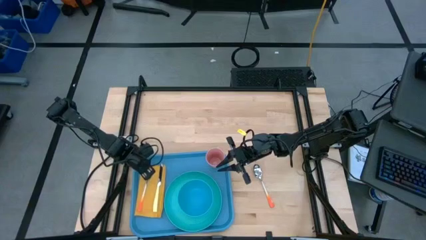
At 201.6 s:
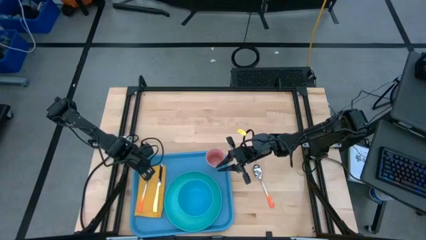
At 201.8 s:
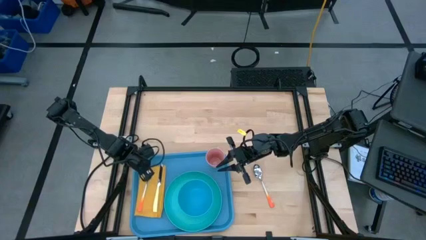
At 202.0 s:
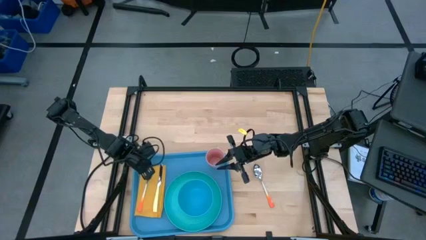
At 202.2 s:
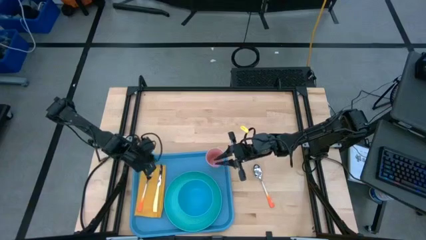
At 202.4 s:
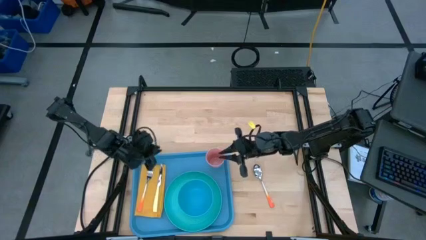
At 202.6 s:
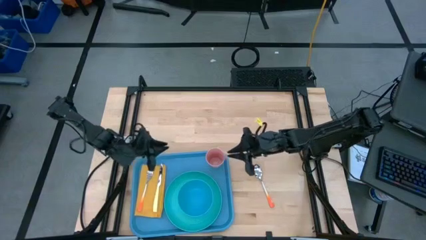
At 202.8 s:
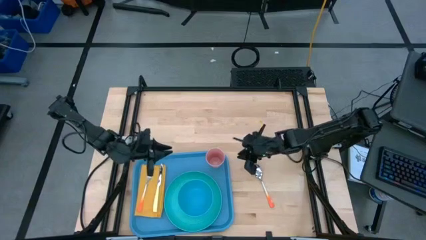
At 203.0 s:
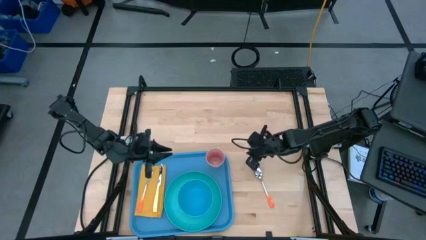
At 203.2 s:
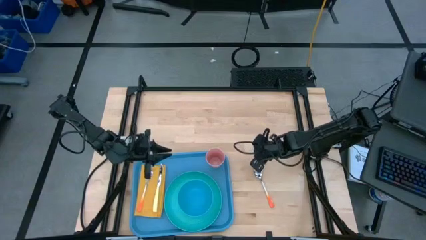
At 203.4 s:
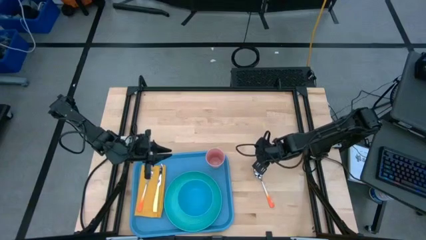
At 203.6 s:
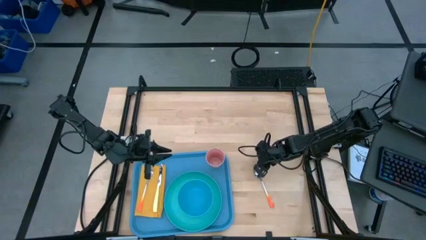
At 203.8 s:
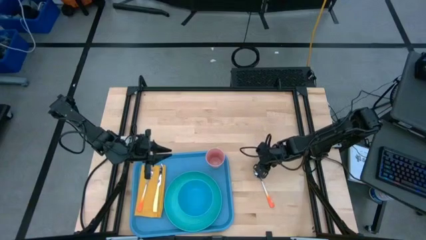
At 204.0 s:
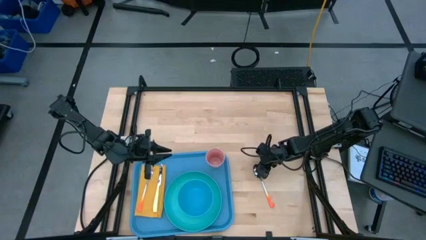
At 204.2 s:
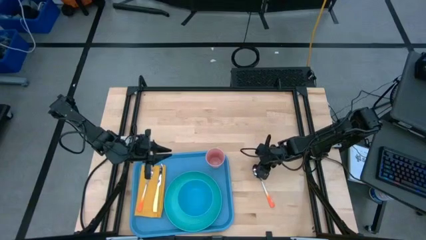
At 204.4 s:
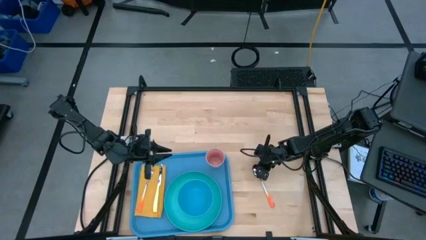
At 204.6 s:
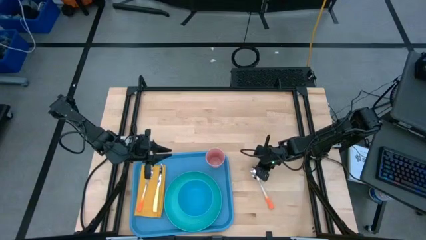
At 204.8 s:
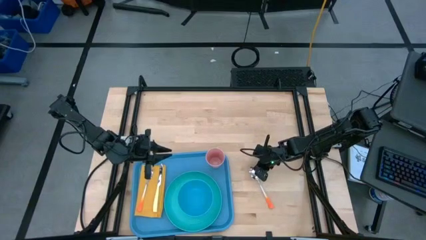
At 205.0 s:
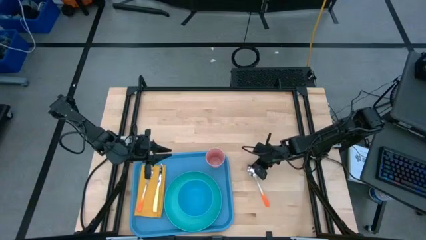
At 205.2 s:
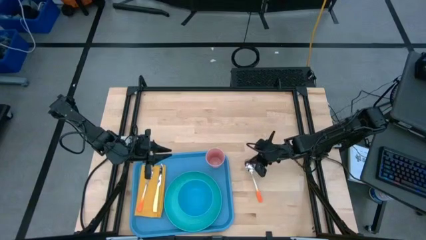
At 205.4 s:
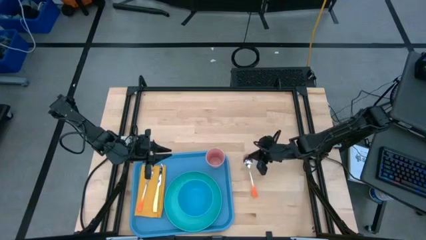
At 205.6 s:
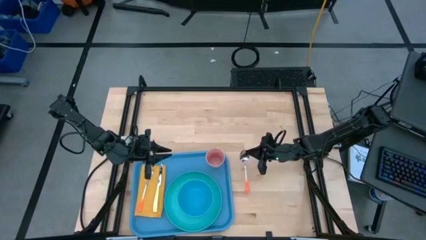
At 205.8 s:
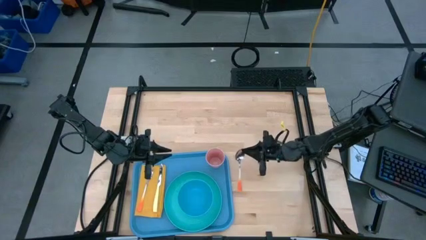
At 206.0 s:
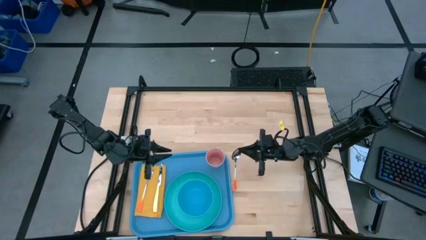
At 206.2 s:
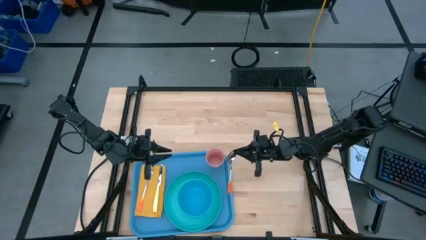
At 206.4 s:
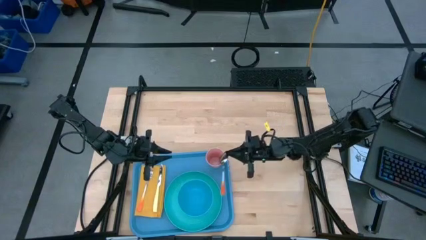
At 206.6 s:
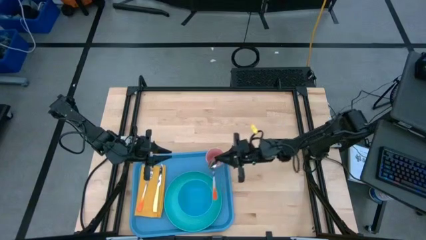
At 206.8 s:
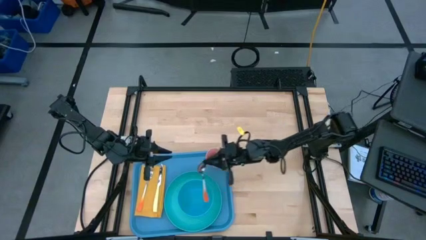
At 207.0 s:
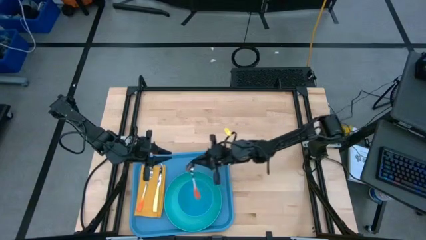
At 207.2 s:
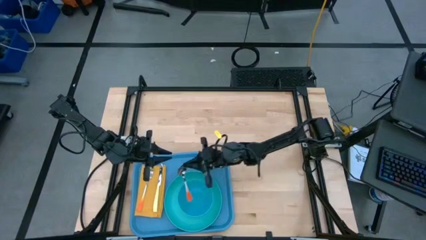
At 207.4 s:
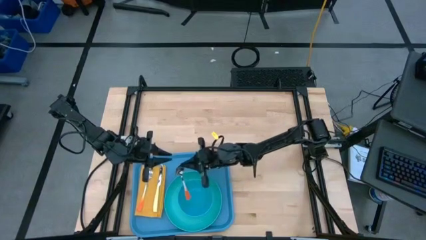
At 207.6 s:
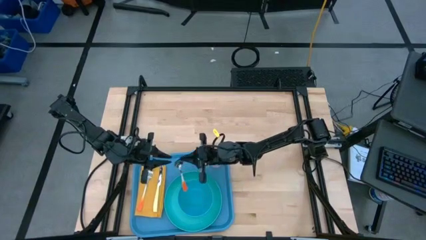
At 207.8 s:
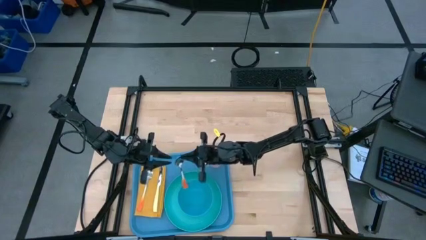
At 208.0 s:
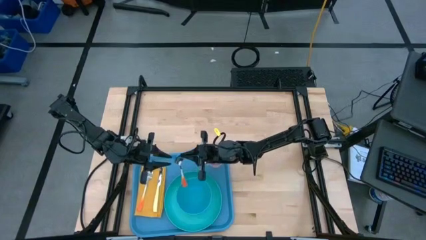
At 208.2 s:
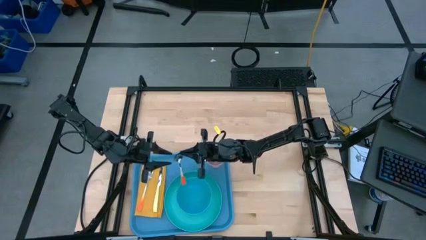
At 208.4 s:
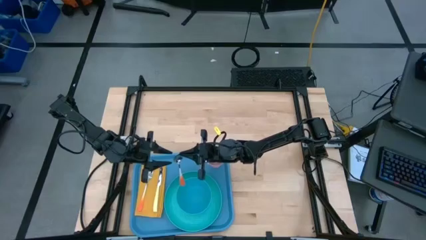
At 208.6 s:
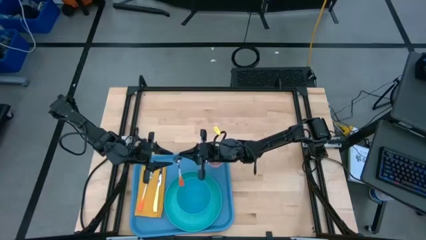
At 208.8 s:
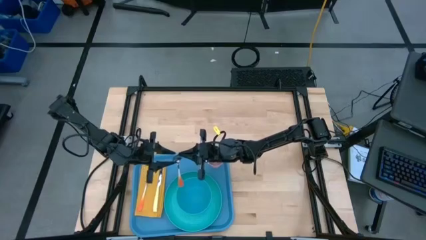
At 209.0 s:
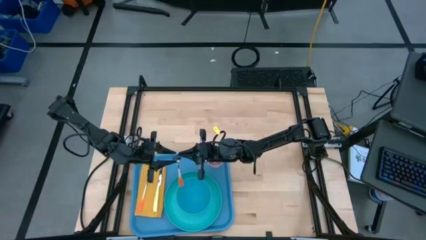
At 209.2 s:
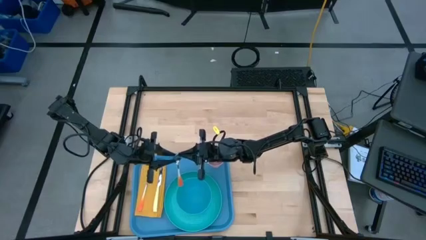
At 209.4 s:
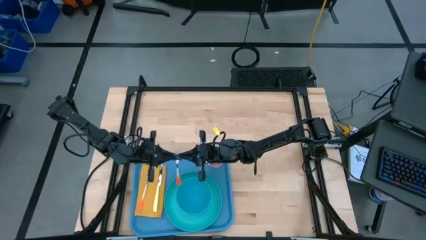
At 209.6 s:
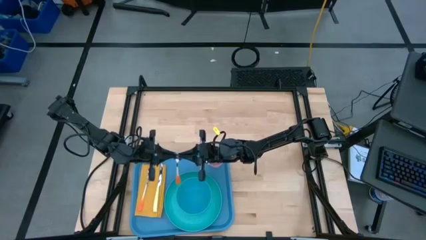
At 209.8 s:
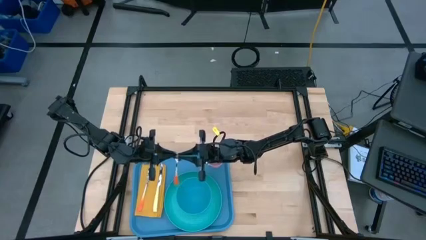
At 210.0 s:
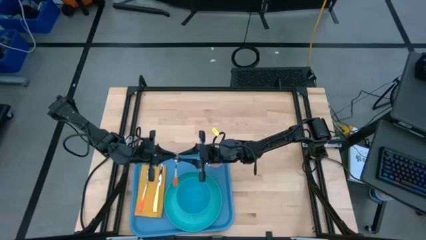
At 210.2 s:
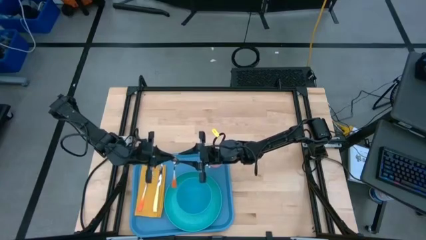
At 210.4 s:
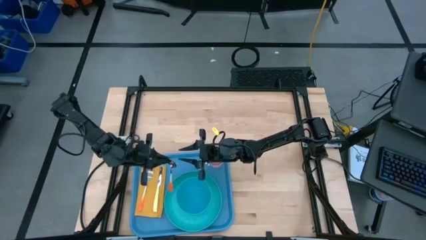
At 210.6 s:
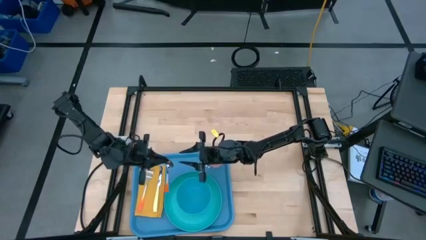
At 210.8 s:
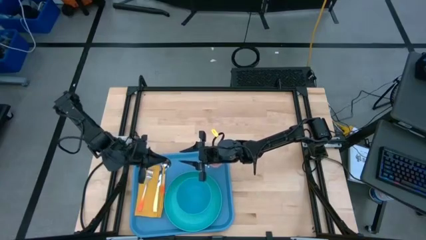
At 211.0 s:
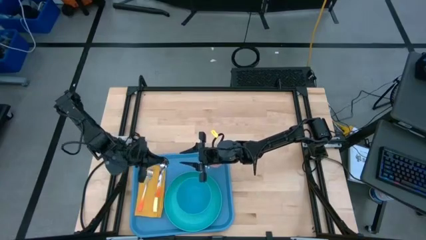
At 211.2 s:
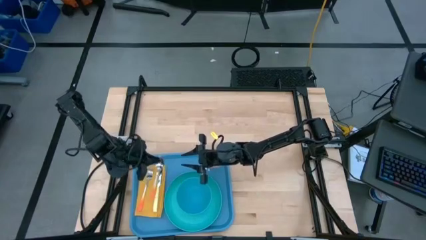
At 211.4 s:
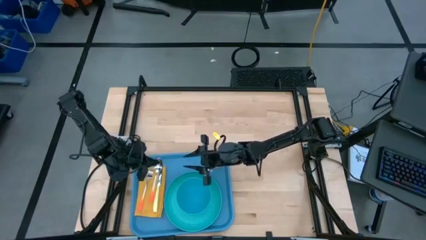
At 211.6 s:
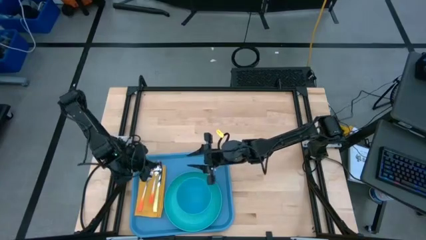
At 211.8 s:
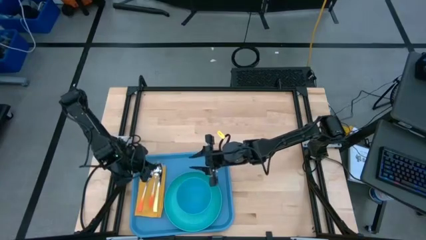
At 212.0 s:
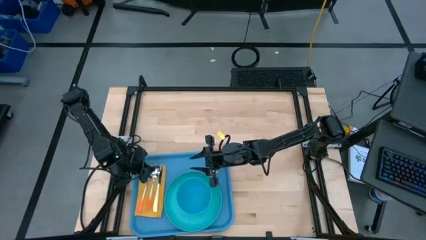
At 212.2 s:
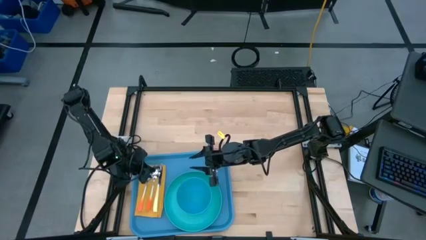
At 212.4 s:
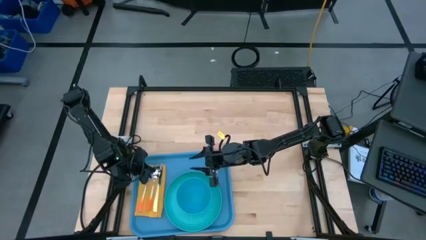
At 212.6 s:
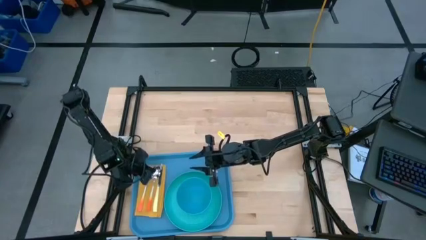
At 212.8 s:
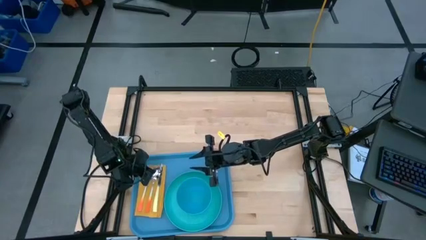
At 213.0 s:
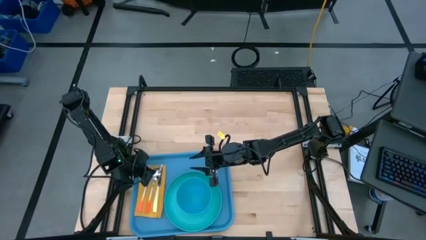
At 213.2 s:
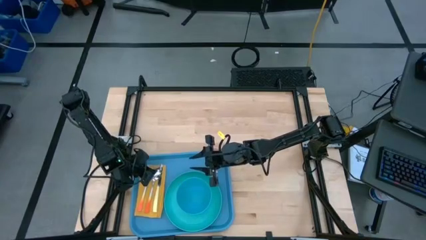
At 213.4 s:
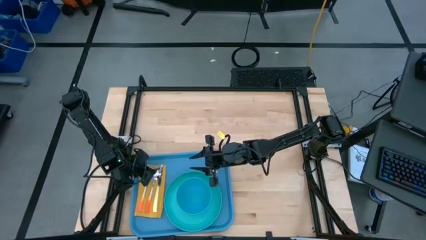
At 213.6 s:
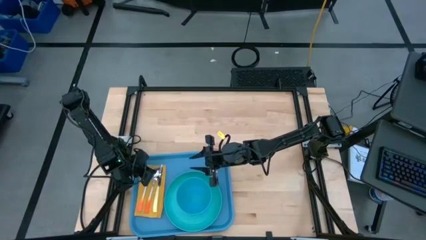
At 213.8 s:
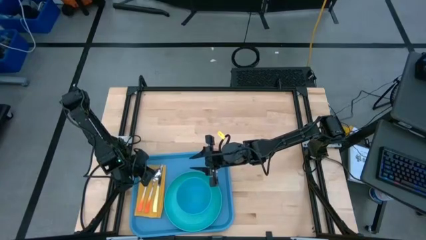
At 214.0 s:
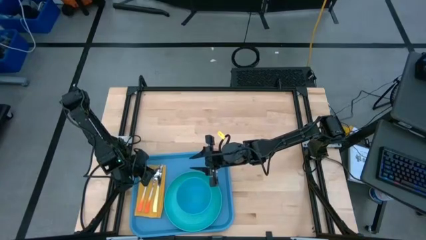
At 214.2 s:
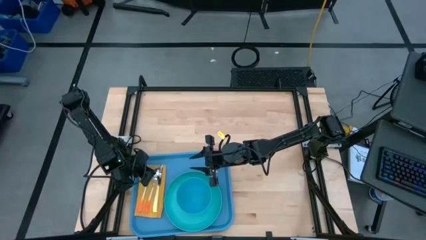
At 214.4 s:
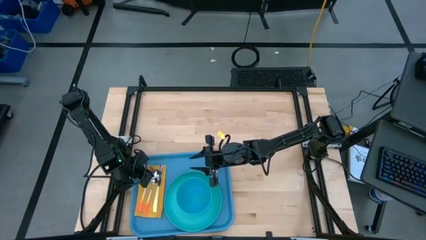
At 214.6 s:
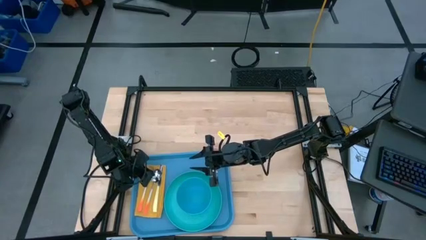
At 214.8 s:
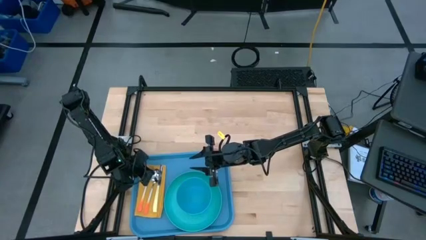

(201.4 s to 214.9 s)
Task: Set up tray
Put the orange spoon on top of the yellow table napkin between the orange fork and yellow table knife on the blue tray

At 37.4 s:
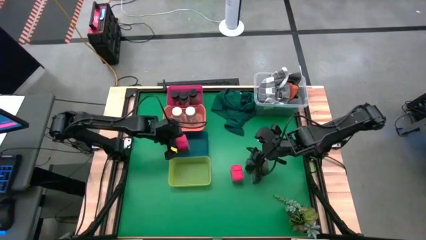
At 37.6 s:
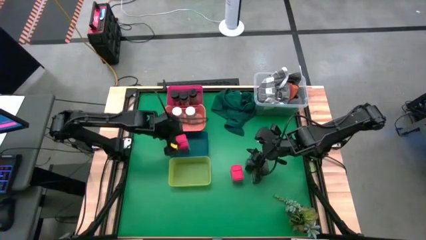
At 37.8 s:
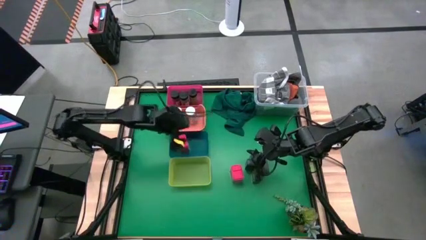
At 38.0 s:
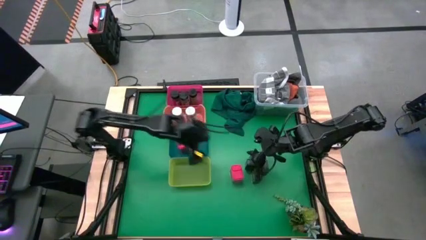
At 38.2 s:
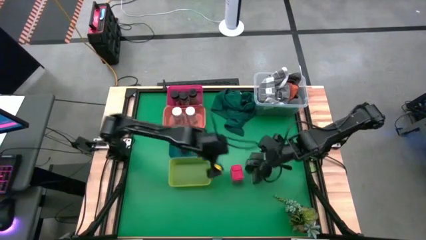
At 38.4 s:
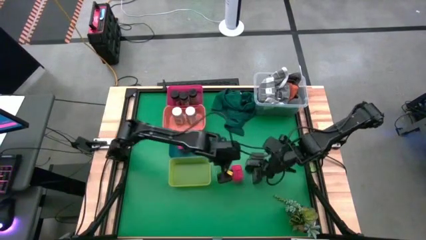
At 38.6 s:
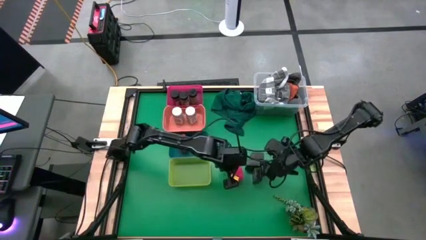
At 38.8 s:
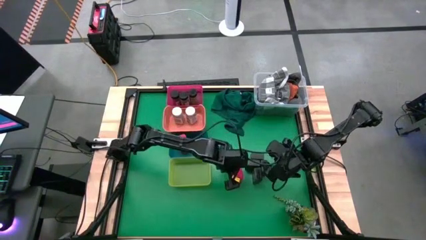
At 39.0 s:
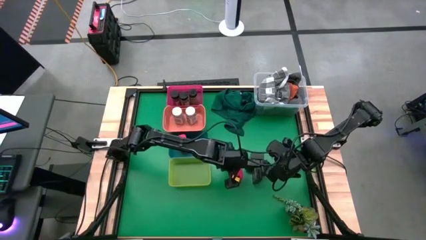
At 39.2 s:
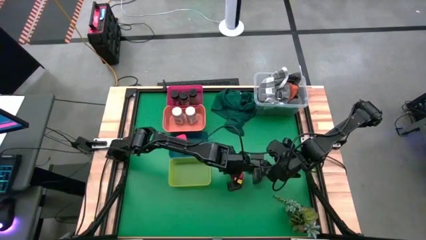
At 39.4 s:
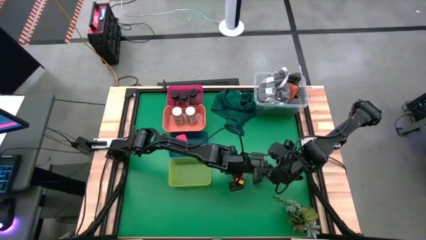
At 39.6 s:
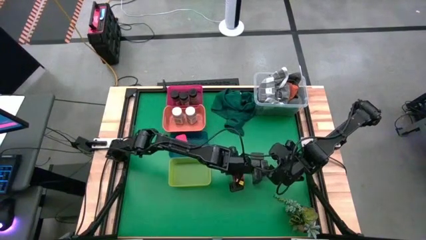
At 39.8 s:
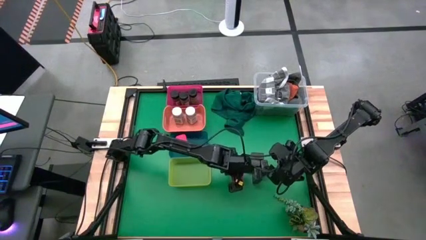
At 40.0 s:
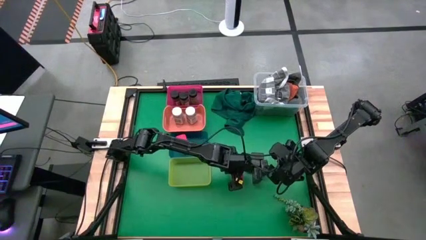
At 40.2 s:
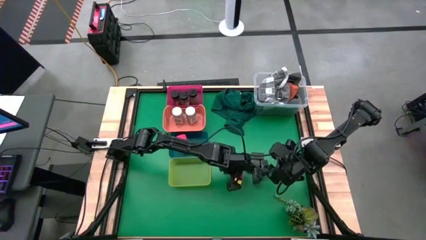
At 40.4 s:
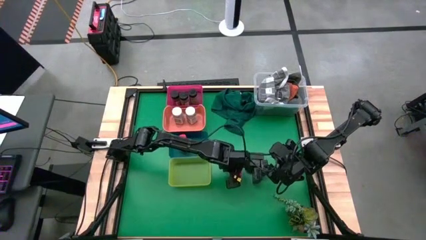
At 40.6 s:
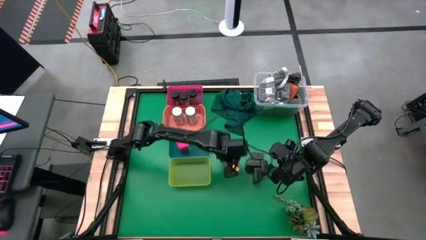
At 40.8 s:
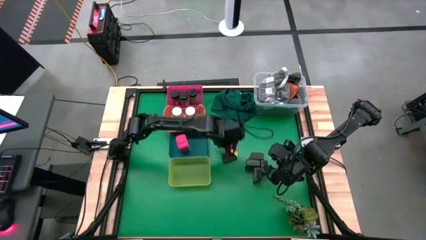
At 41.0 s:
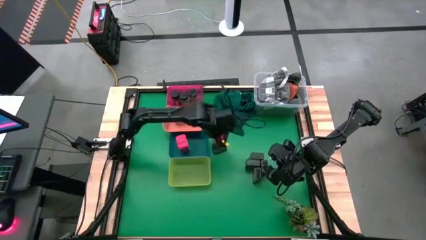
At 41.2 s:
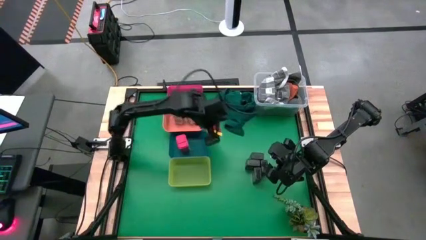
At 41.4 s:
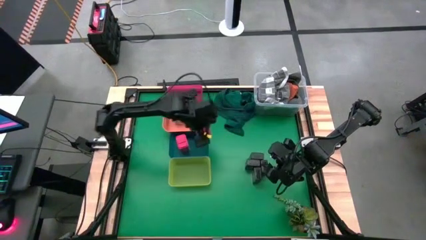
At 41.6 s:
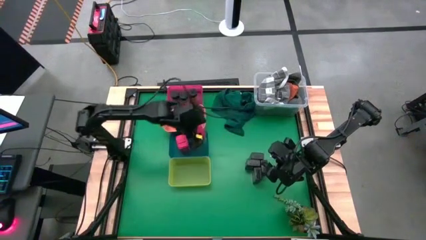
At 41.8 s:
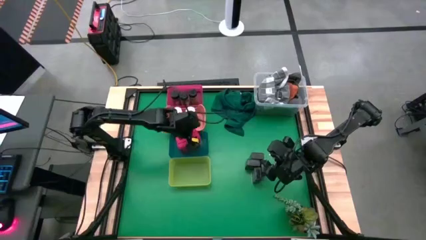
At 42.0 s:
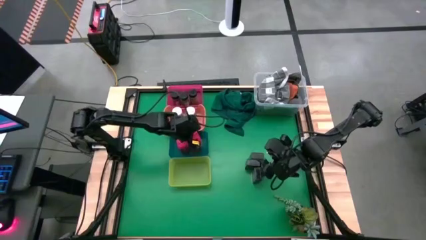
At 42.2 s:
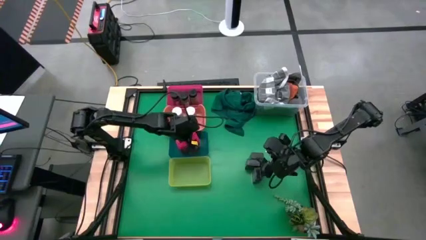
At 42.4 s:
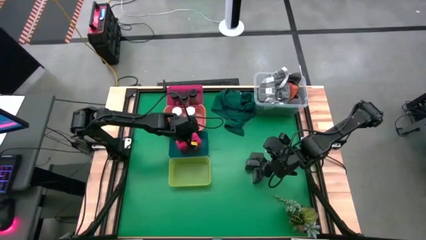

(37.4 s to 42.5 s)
Task: Sort spices by type
Put the red spice can into the blue bin
